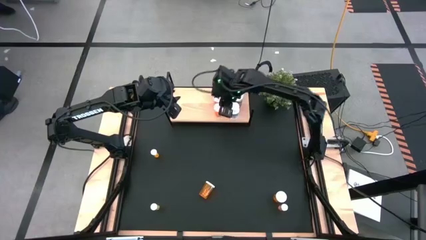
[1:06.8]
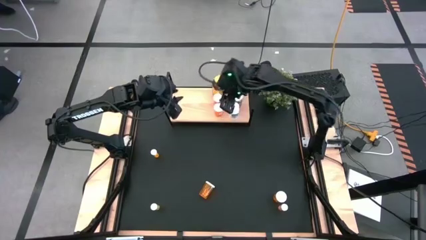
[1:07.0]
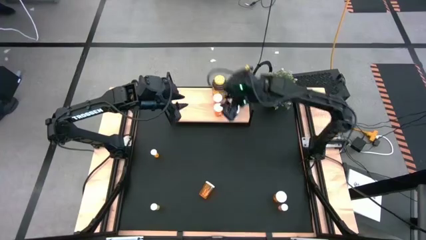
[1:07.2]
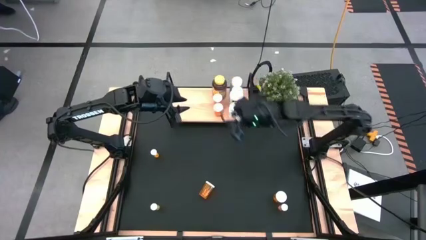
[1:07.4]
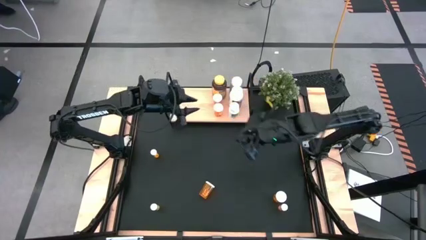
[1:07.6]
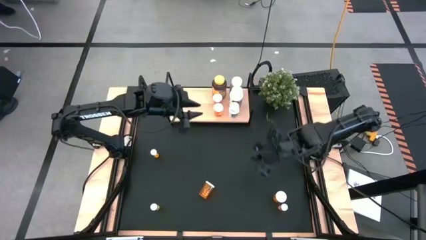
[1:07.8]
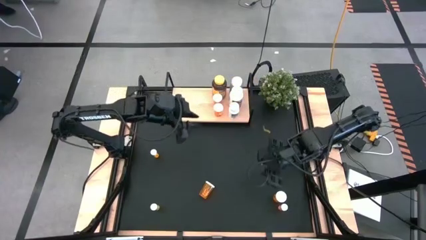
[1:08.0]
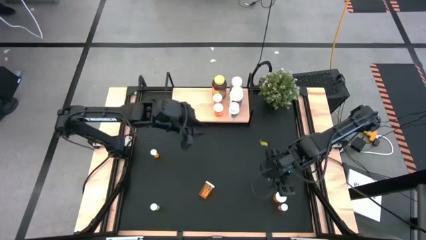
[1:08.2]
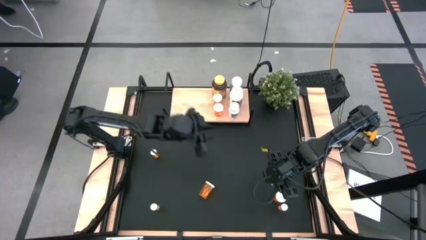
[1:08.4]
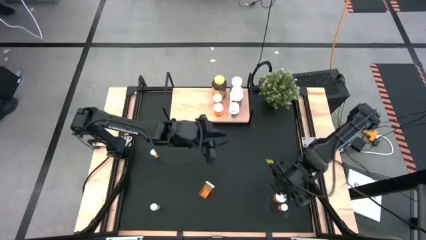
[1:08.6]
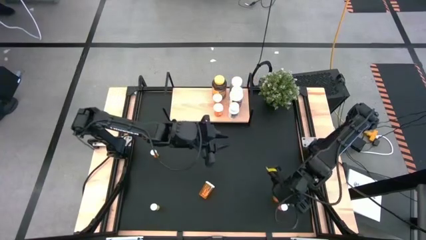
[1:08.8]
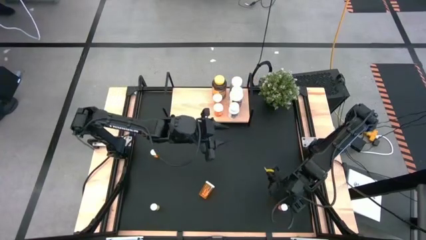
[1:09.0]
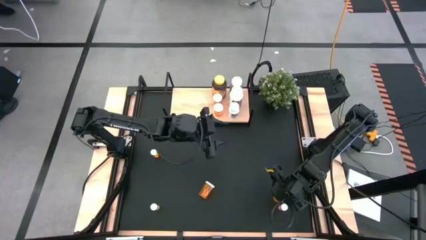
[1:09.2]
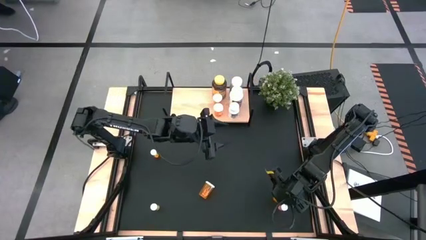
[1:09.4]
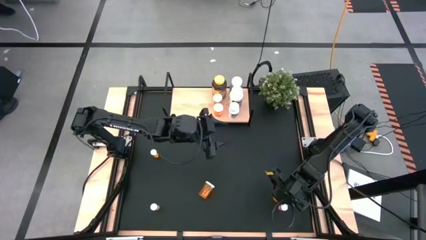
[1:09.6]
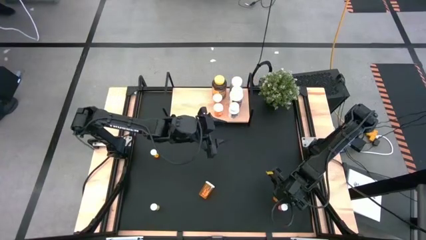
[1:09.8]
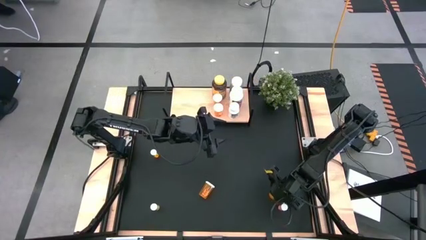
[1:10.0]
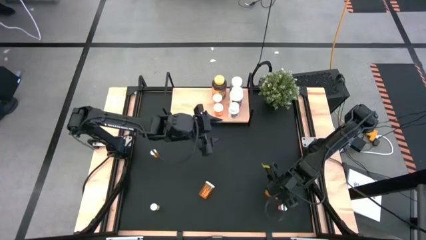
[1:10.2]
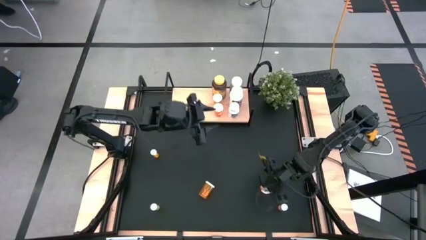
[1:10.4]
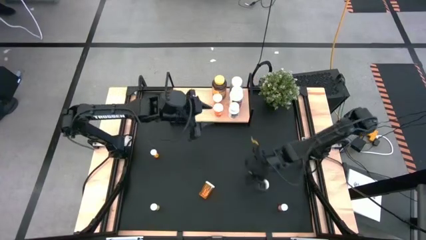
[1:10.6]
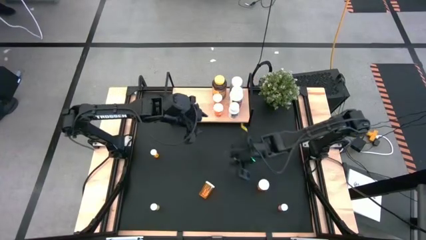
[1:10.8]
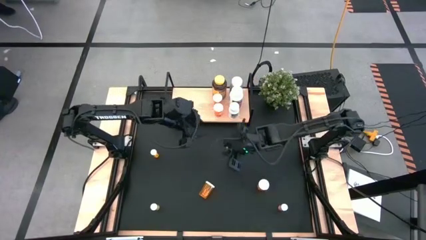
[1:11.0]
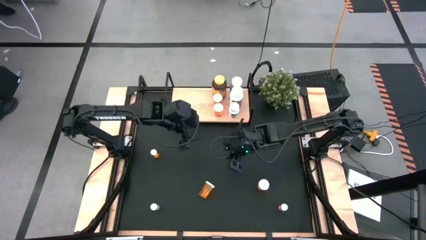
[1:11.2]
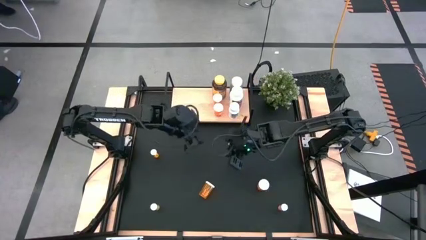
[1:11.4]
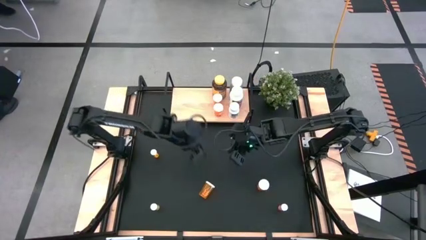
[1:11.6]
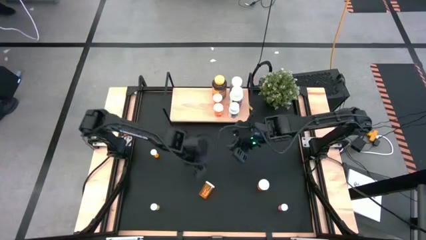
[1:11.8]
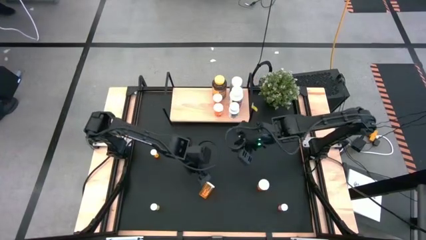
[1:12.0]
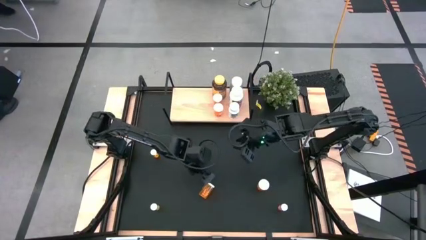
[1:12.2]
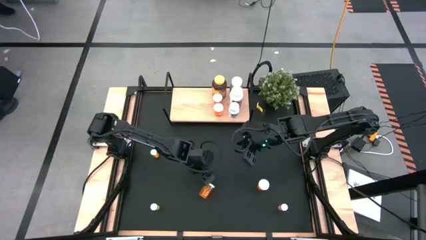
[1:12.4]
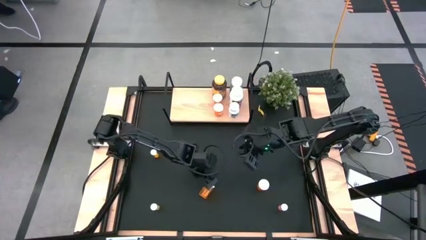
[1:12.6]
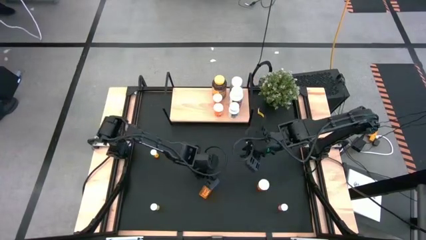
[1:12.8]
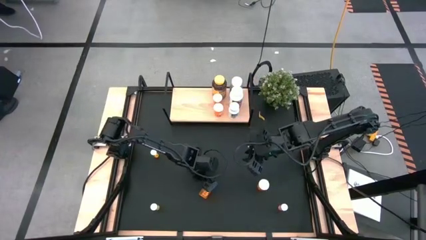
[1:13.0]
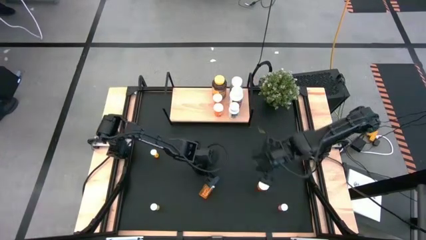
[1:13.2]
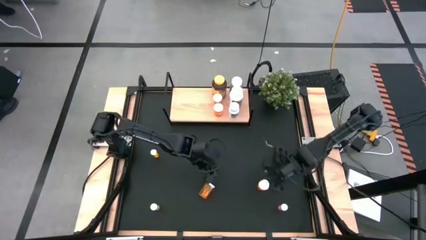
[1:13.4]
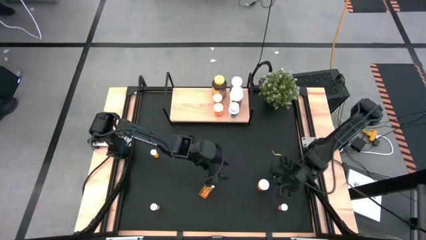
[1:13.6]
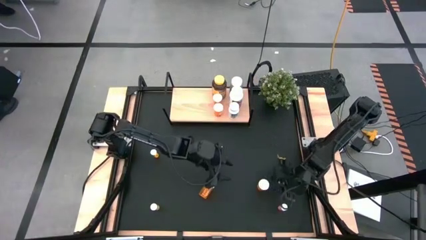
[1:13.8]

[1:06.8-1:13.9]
Task: Pick and place medicine bottles onto shelf by color
Put the orange pill bottle on the shelf

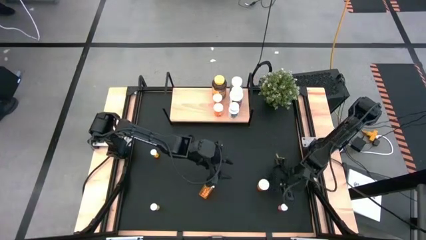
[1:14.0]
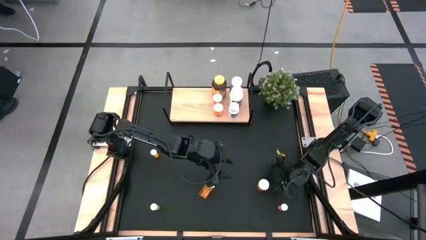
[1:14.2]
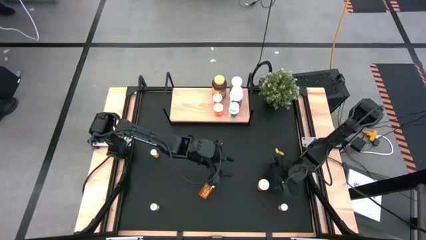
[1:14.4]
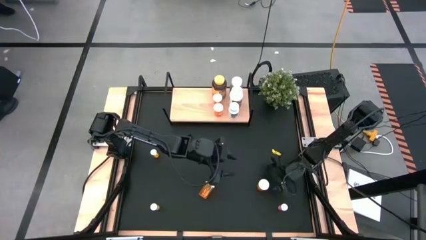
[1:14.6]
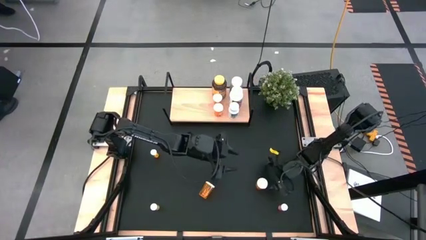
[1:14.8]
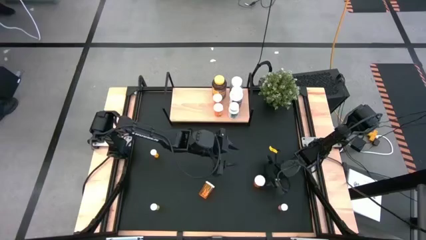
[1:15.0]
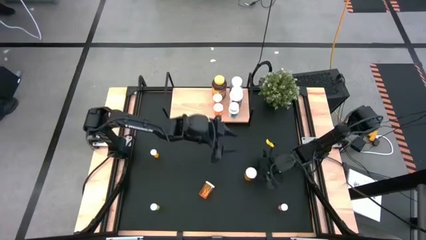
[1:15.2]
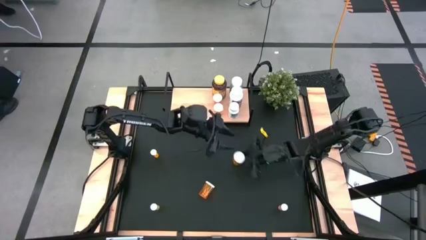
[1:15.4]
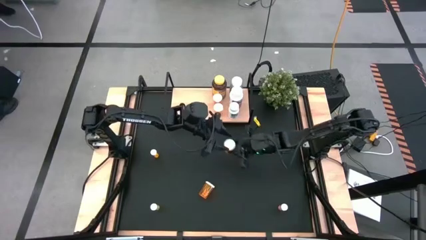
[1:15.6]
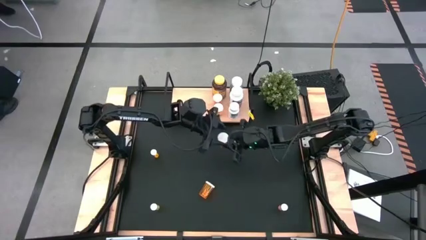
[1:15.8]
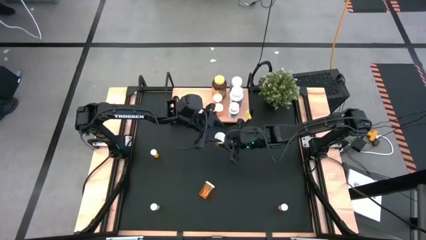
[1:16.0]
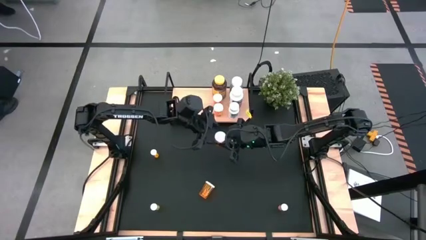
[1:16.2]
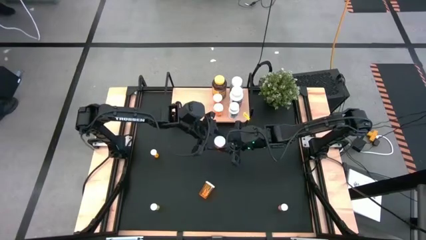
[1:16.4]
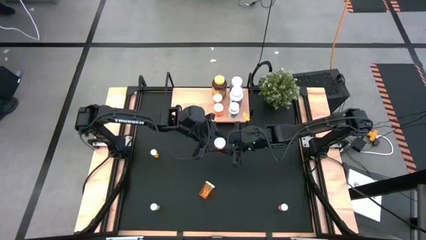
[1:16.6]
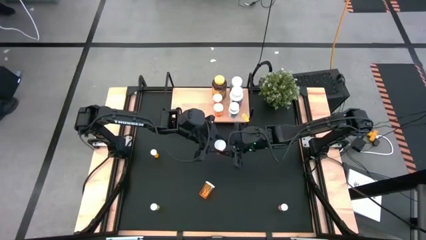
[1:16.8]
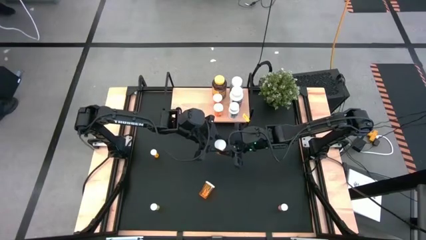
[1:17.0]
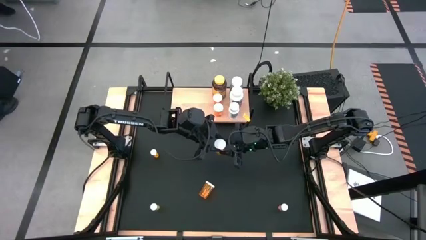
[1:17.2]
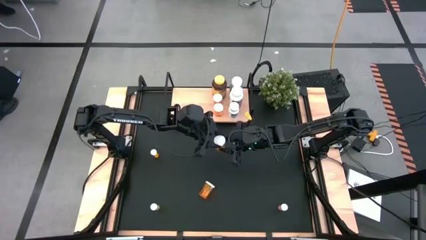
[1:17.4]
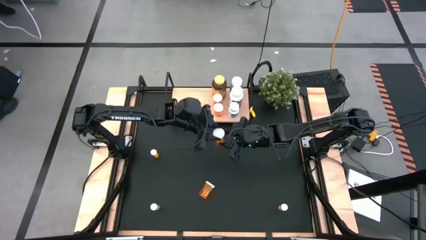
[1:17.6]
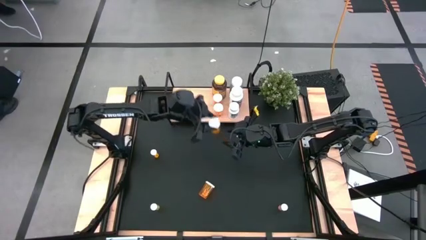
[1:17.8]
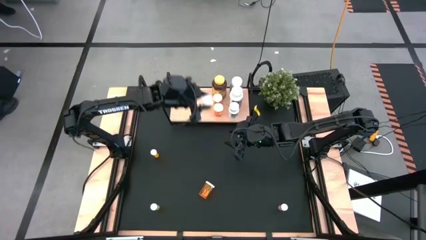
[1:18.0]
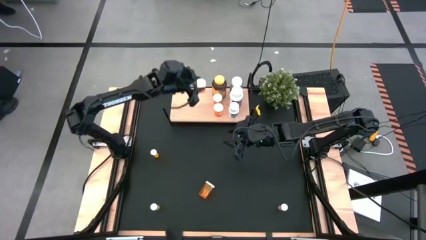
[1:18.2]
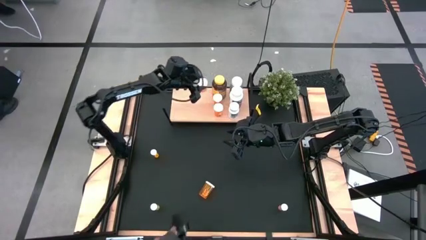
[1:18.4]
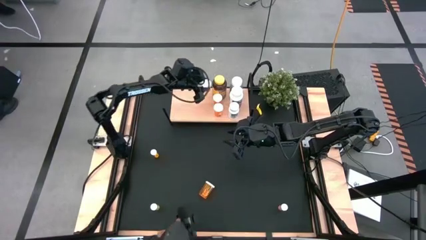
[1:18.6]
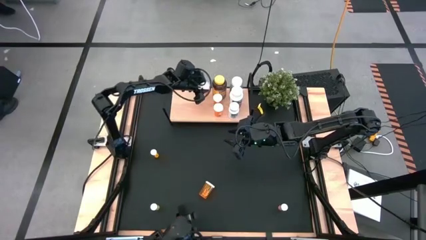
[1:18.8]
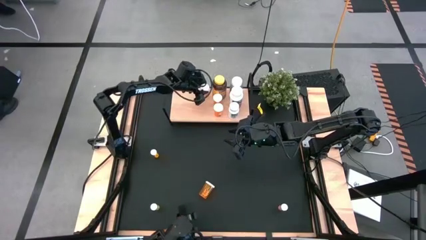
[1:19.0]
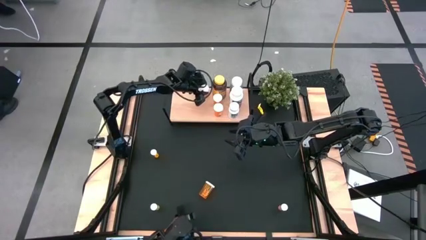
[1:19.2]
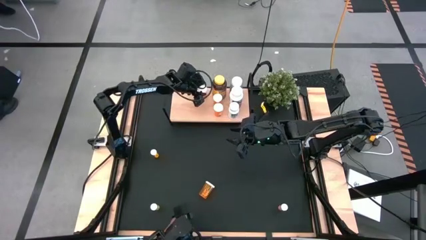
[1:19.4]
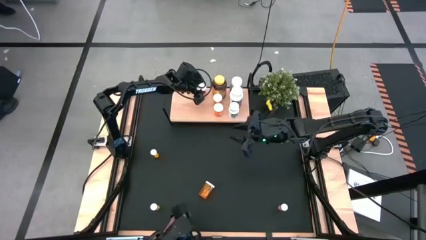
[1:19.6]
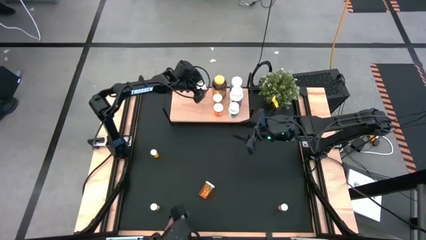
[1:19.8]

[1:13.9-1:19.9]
Put the orange pill bottle on the shelf

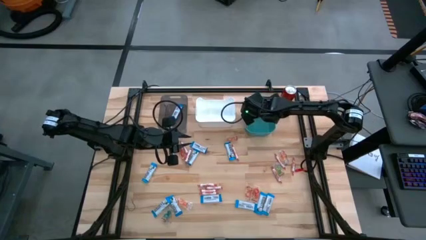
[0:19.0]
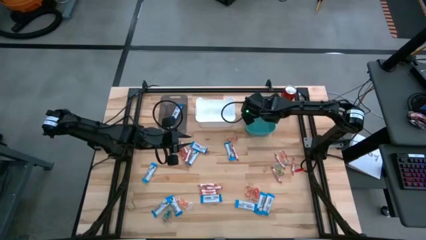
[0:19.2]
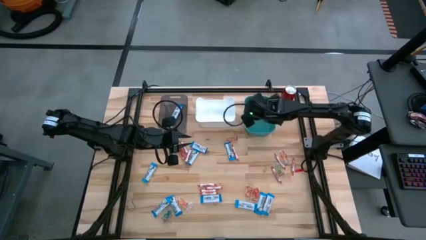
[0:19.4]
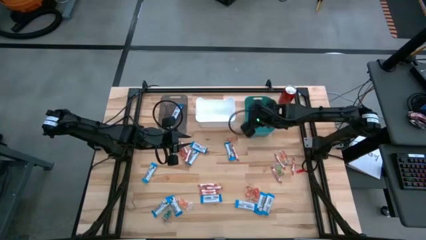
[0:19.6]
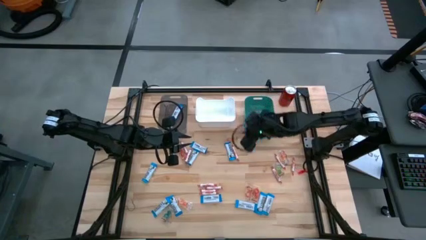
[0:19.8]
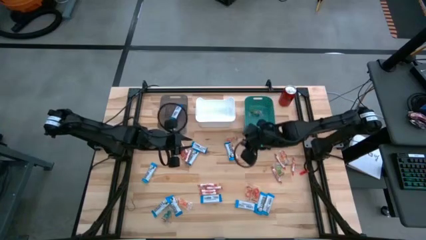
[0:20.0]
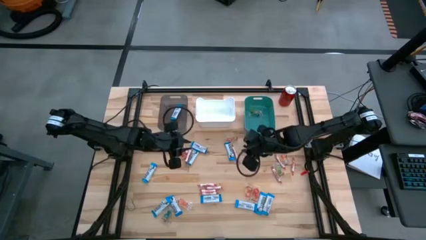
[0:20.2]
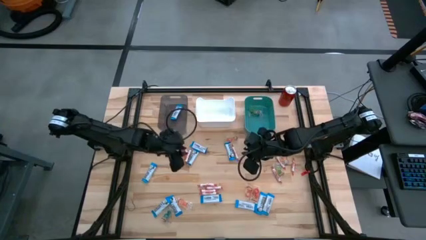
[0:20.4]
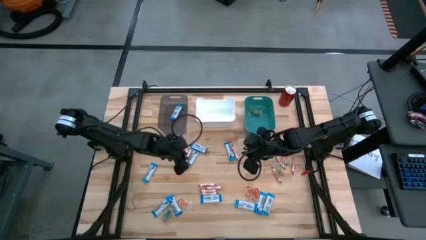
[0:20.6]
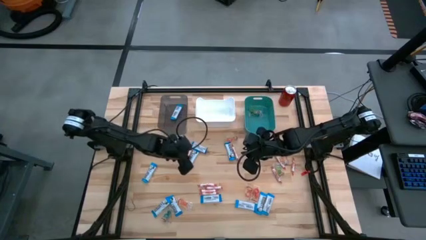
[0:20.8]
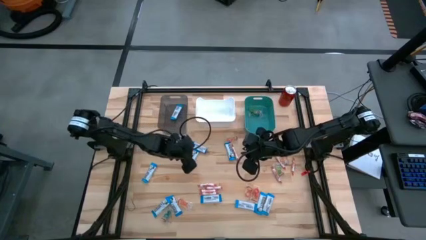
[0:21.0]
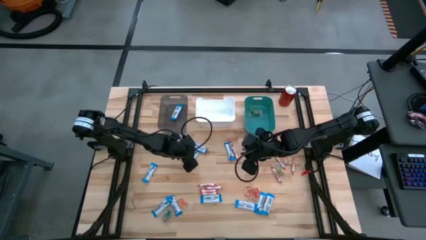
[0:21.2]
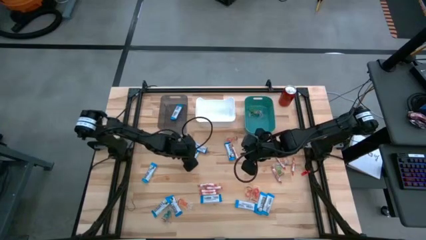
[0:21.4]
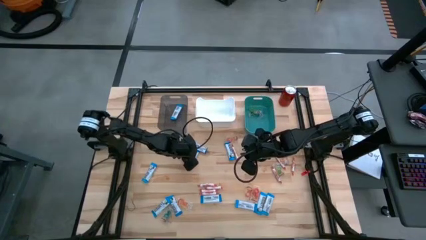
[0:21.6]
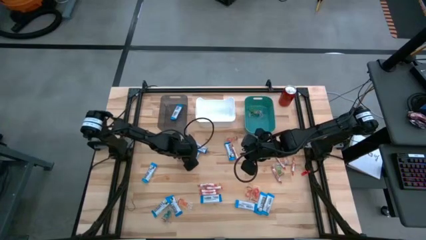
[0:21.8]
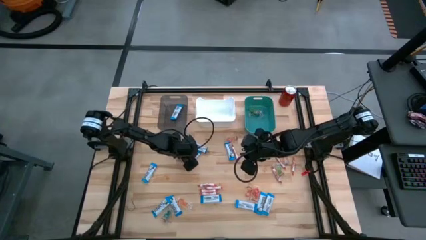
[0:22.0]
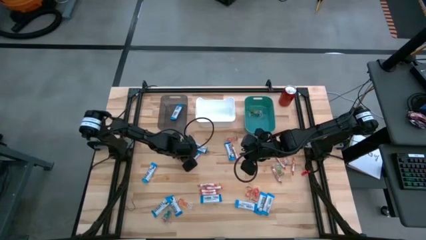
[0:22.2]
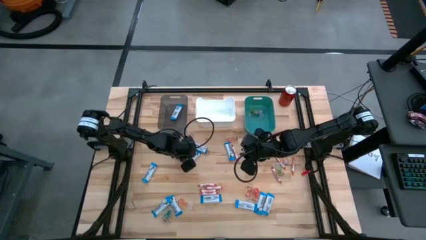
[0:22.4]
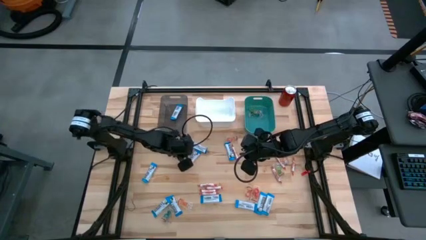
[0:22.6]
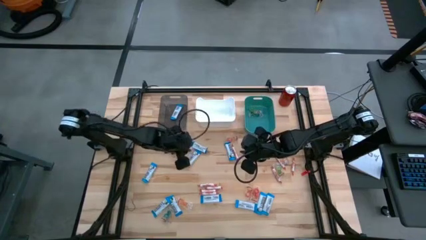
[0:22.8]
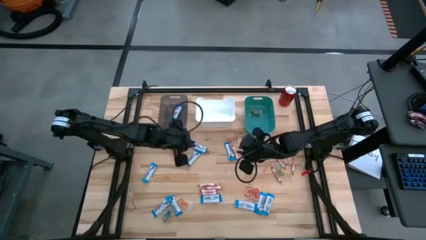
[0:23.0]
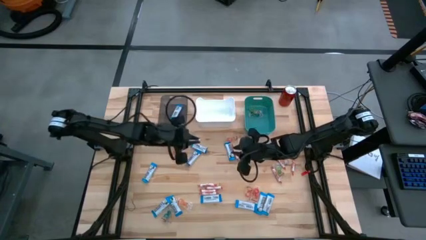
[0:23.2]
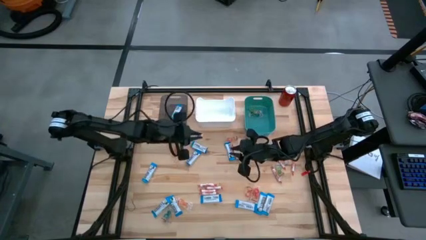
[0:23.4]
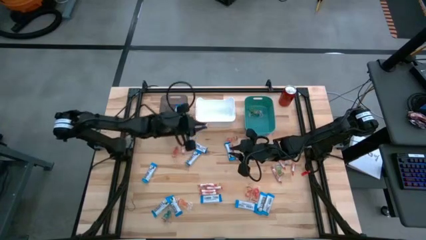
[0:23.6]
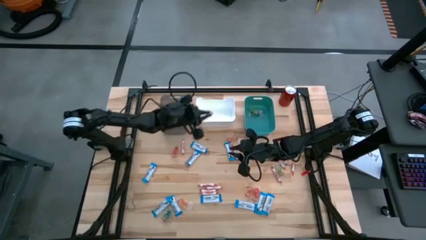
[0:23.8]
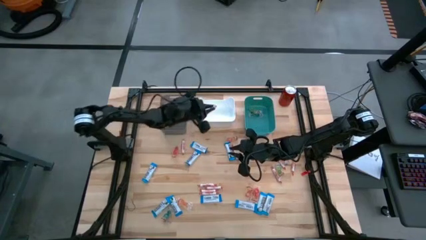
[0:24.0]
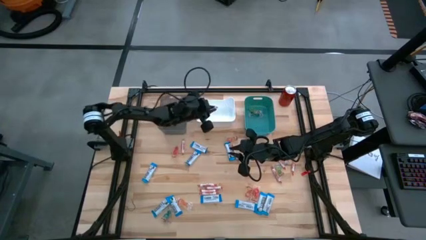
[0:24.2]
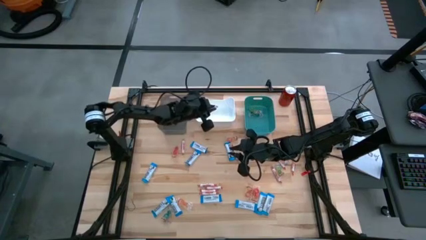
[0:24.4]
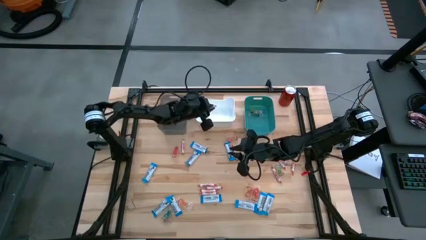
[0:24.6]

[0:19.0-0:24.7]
Task: Sort candy
Put the orange candy into the white bin
